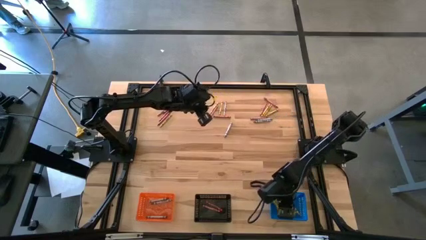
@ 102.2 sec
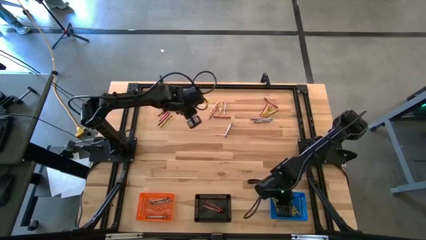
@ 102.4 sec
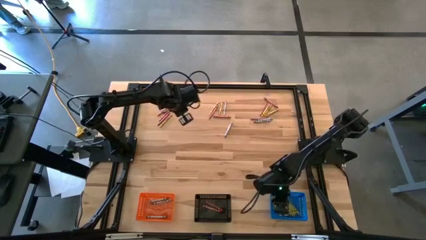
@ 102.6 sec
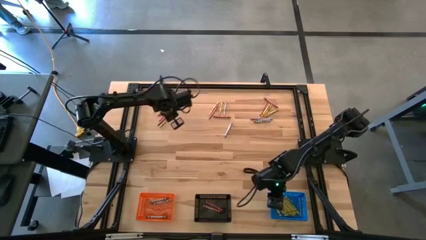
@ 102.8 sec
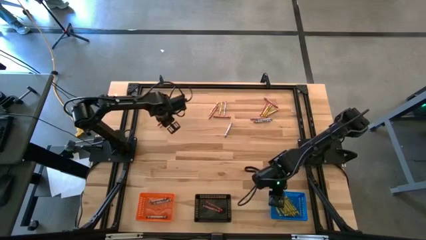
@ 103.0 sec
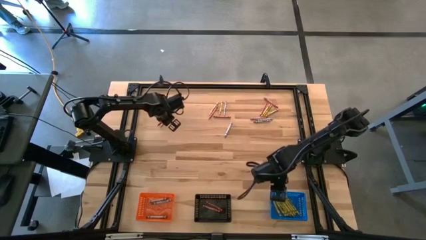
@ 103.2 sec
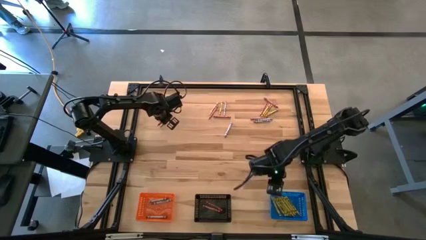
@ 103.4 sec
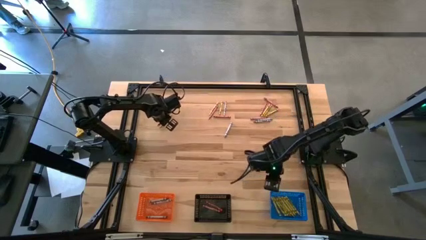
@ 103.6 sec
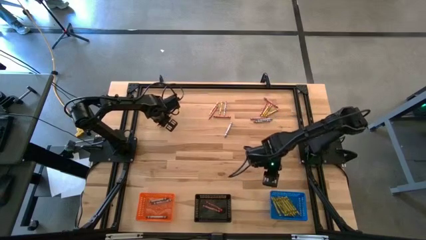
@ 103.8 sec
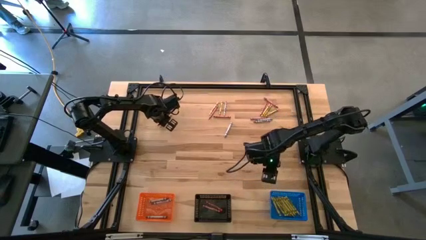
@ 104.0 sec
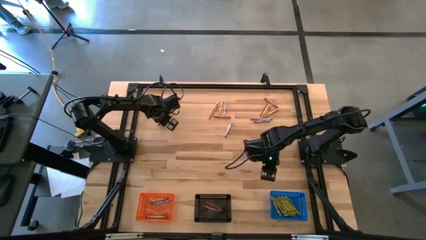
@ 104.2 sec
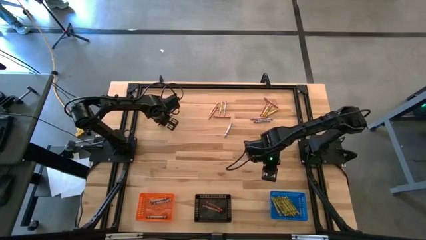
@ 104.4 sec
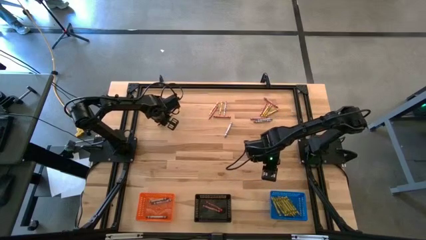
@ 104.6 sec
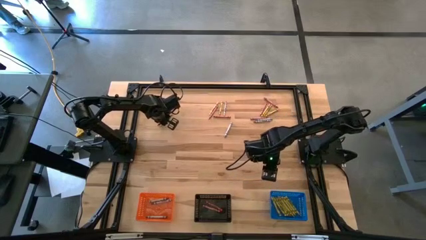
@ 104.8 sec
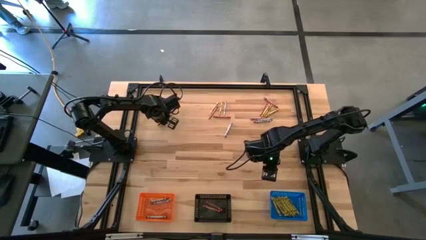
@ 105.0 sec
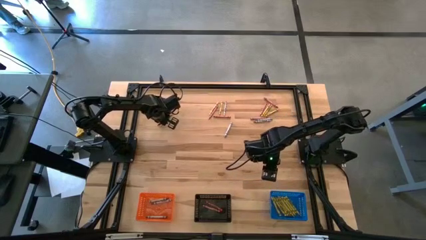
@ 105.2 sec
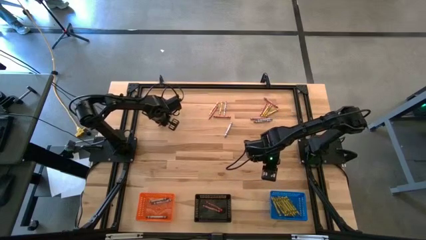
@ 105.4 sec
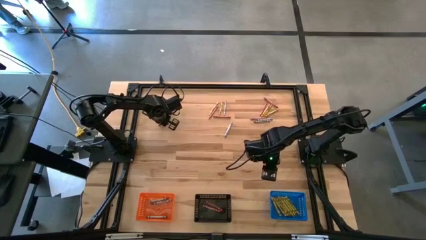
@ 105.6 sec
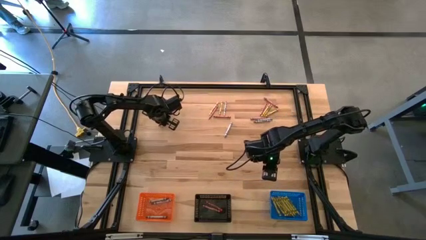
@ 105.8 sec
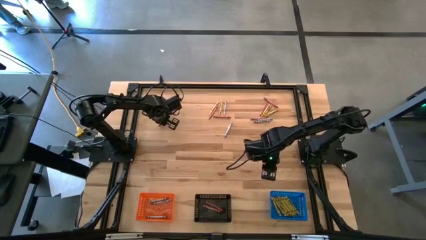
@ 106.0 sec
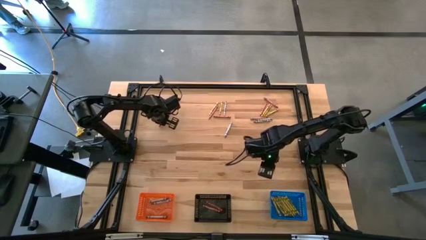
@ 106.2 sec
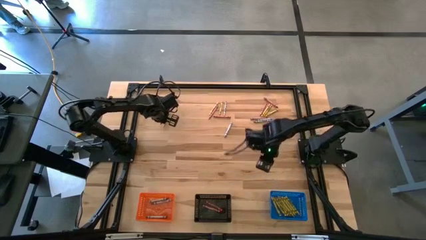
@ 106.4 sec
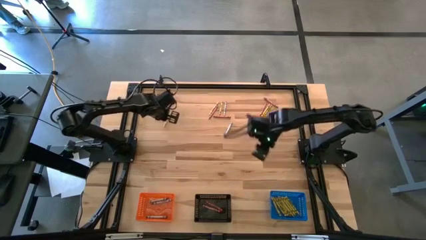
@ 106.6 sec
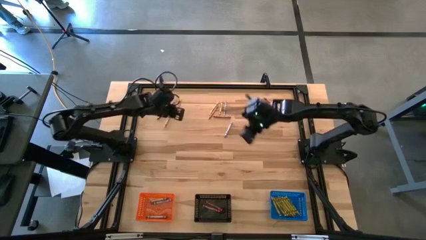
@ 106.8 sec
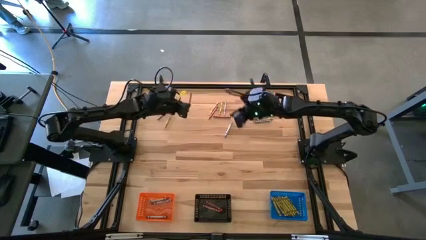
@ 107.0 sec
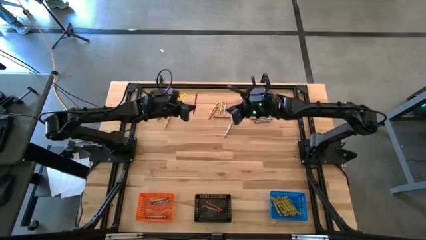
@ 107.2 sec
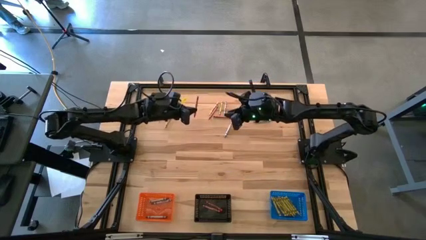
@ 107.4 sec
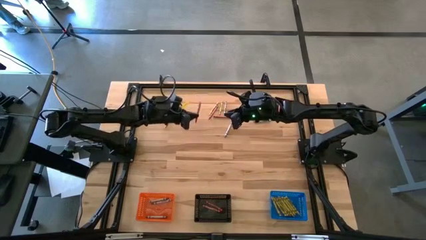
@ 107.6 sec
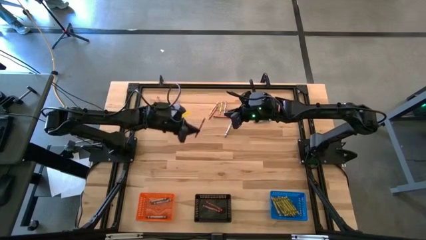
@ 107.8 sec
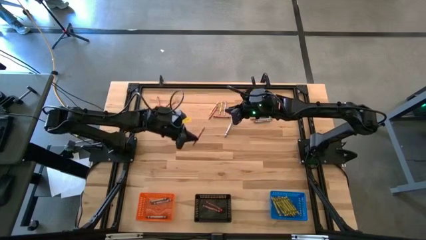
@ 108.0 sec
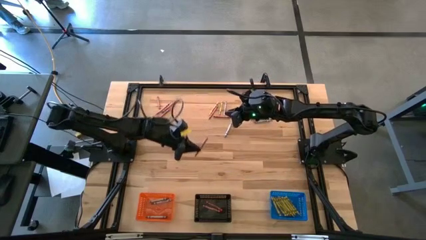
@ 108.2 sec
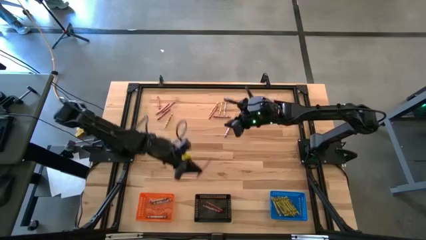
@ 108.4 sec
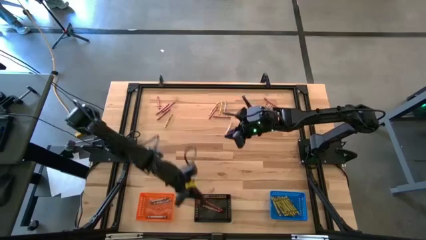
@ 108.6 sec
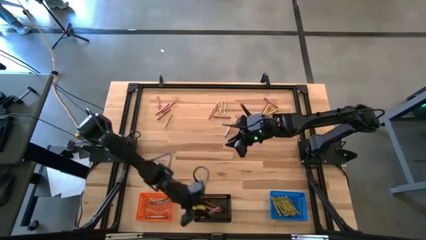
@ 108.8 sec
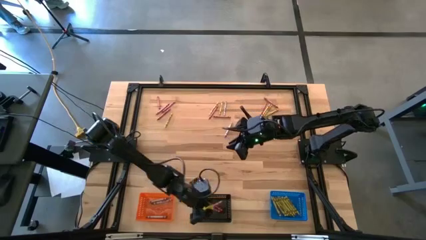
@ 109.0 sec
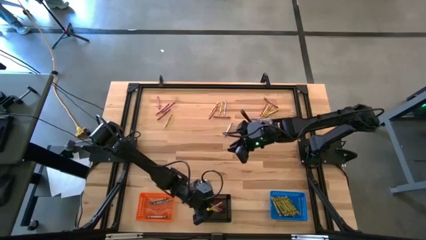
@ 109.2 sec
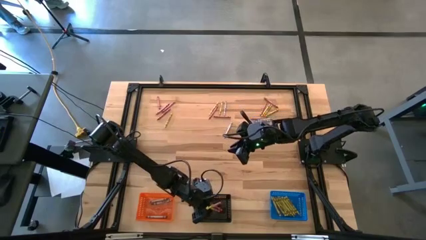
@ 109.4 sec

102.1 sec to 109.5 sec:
Task: Sort crayons
Put the red crayon into the black bin

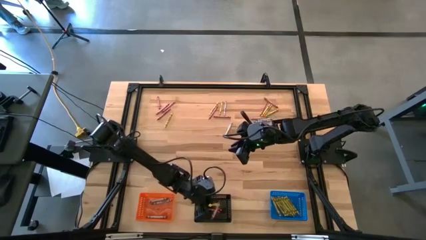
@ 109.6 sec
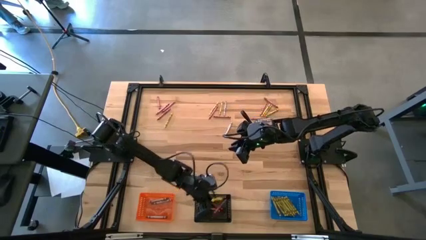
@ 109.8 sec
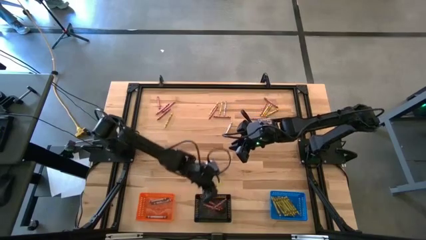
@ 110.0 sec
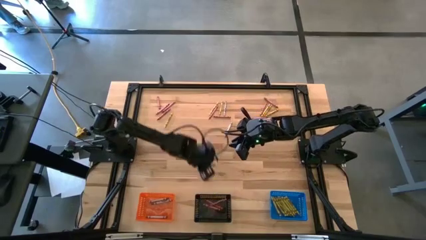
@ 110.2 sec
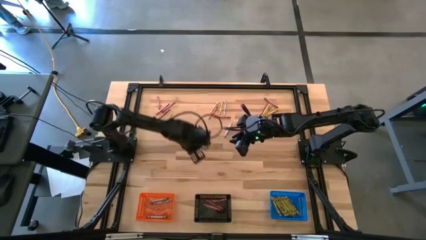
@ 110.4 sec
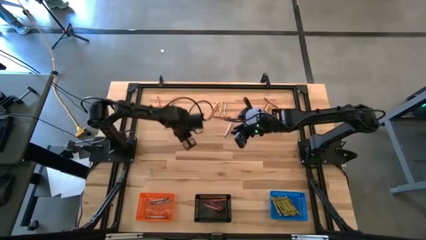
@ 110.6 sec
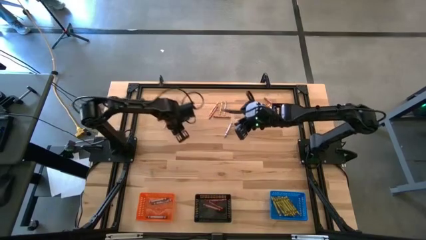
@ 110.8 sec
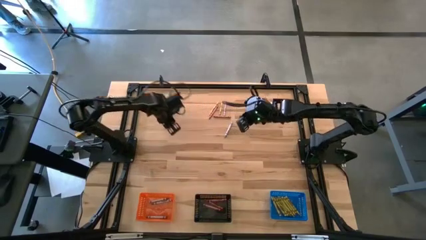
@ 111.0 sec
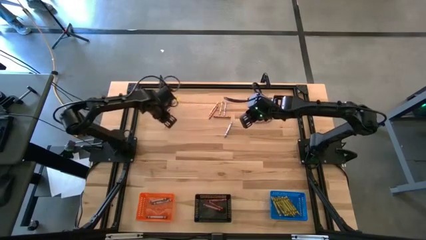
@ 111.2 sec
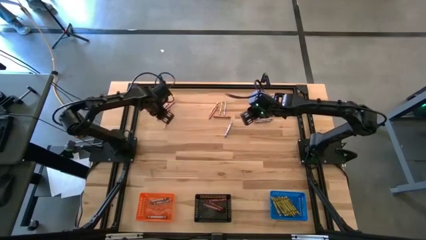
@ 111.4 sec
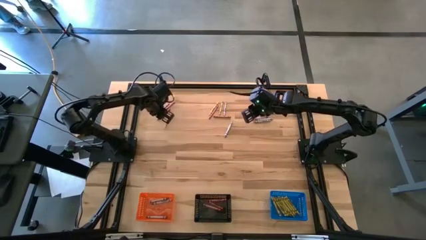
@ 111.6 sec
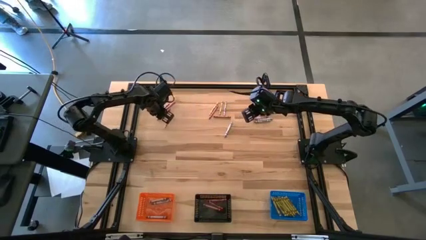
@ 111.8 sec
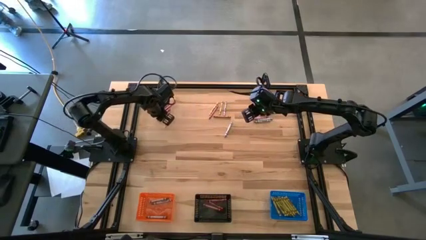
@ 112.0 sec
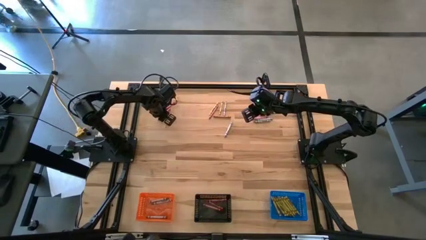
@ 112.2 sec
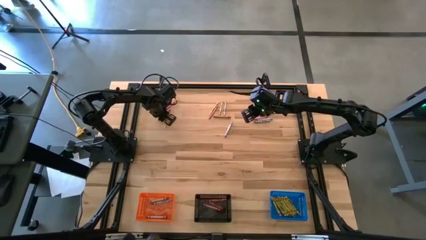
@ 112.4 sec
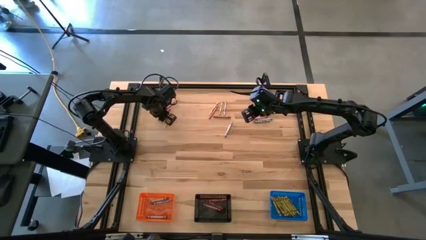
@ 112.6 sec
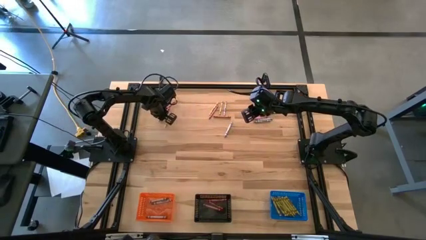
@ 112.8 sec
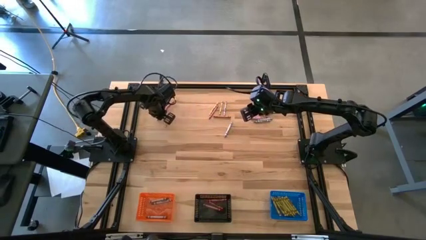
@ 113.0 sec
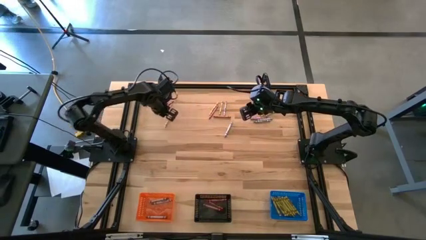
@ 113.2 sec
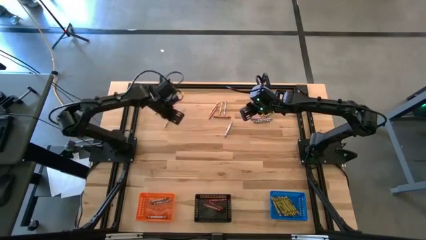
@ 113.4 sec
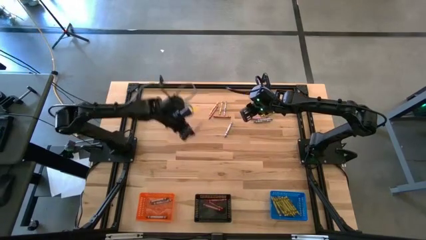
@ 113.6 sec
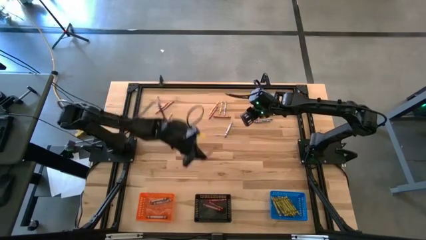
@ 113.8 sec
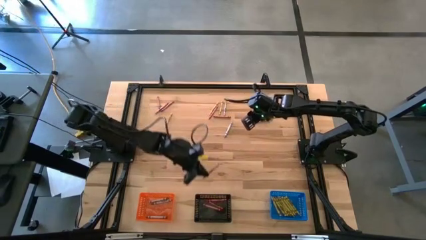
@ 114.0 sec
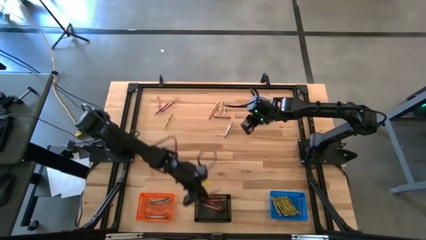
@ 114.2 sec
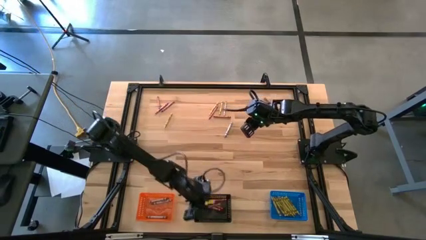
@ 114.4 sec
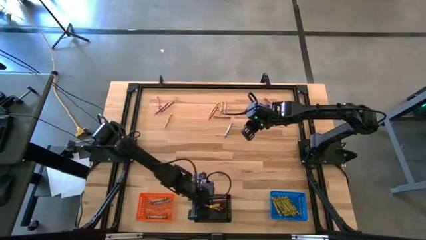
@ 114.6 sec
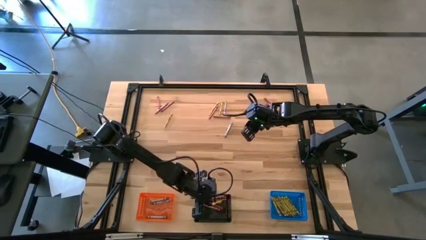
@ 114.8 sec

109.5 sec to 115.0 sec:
Put the red crayon into the black bin
